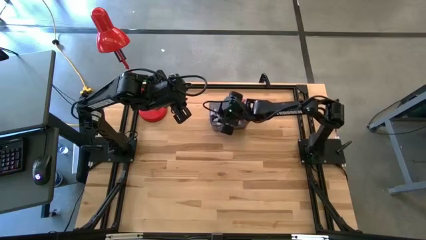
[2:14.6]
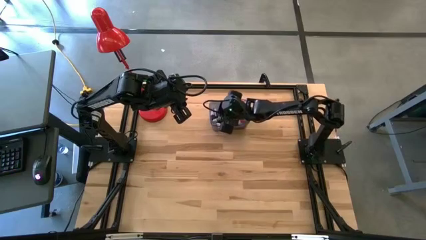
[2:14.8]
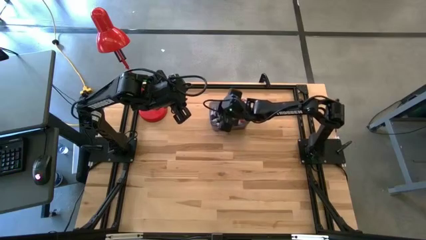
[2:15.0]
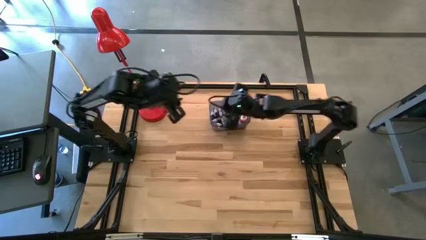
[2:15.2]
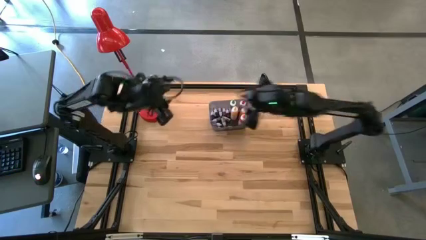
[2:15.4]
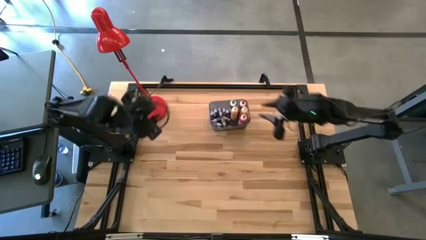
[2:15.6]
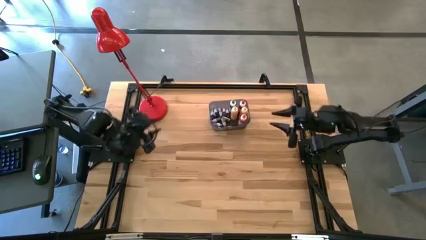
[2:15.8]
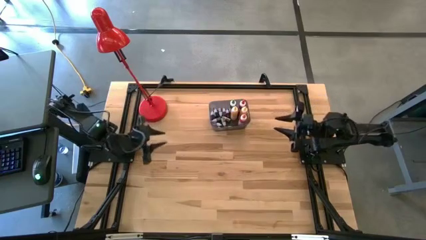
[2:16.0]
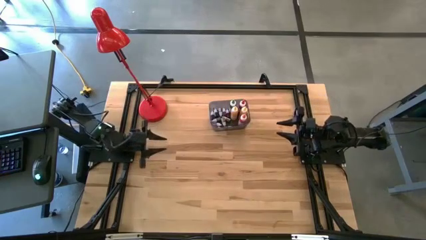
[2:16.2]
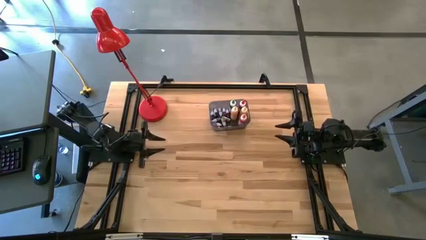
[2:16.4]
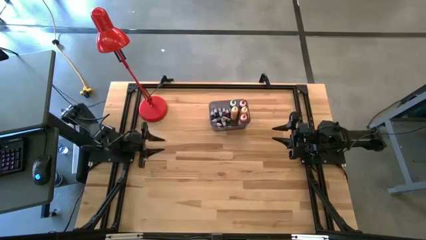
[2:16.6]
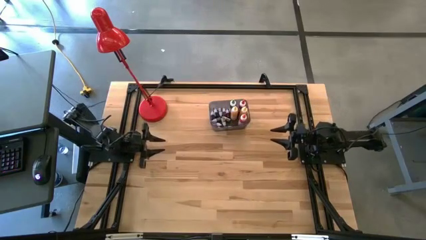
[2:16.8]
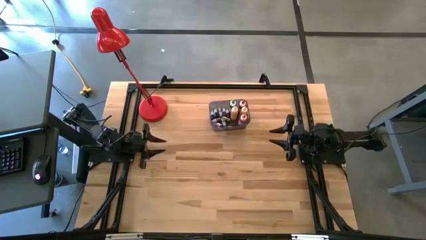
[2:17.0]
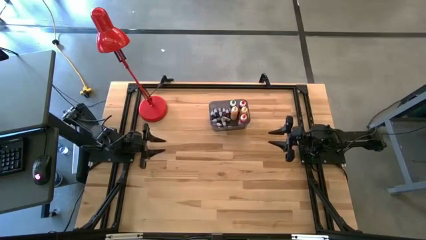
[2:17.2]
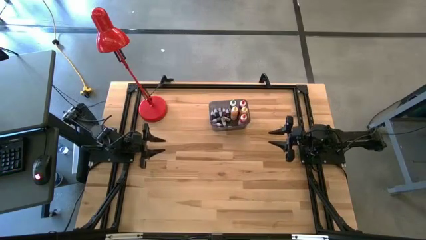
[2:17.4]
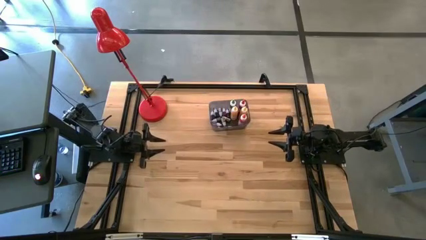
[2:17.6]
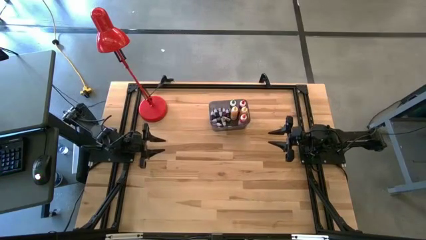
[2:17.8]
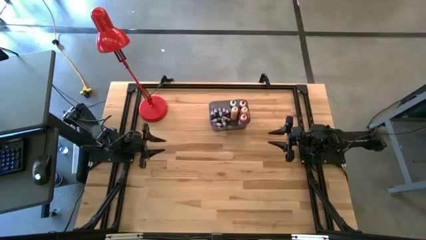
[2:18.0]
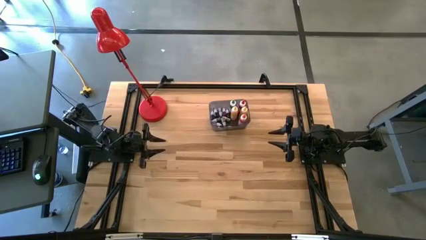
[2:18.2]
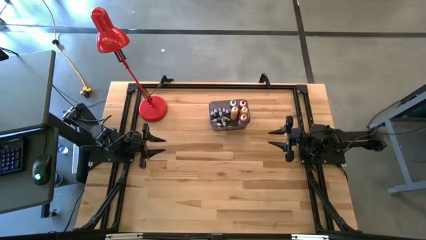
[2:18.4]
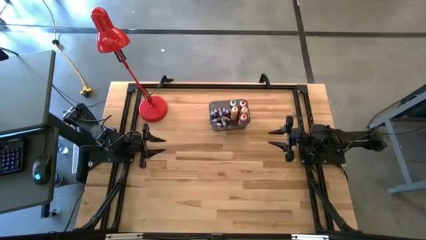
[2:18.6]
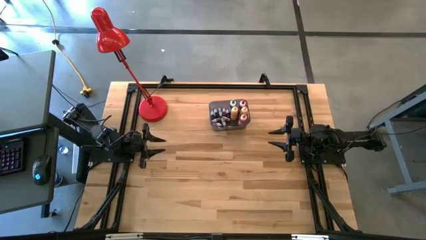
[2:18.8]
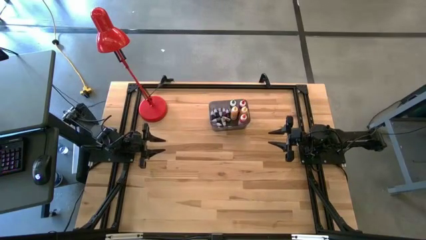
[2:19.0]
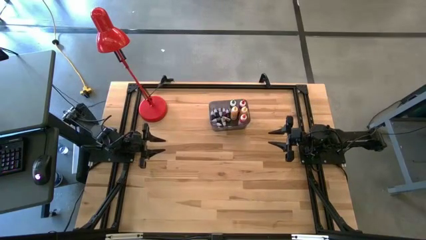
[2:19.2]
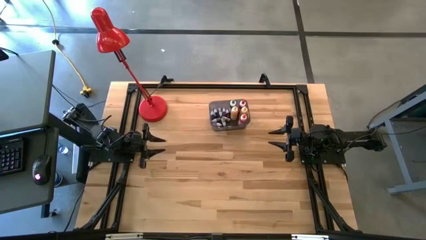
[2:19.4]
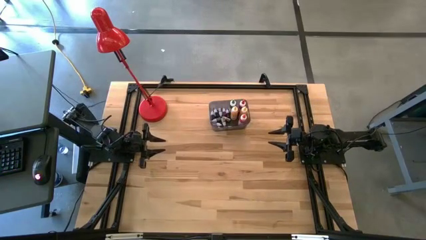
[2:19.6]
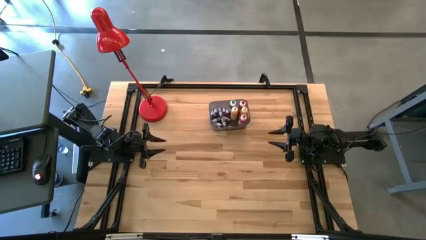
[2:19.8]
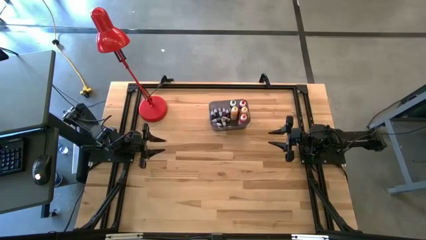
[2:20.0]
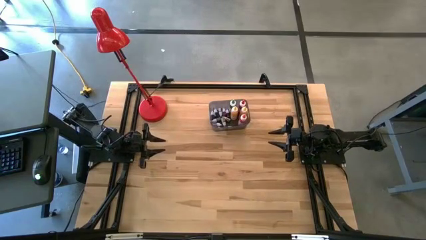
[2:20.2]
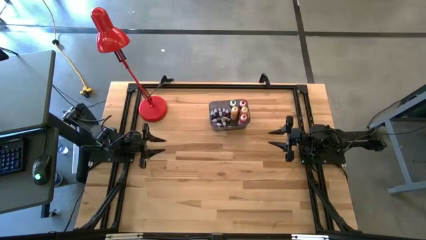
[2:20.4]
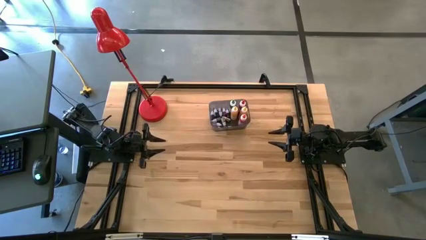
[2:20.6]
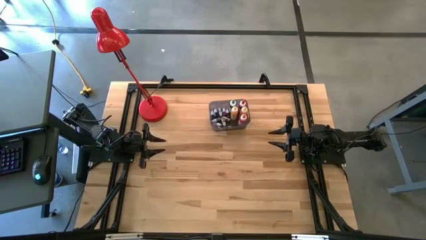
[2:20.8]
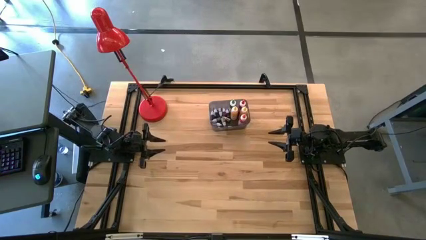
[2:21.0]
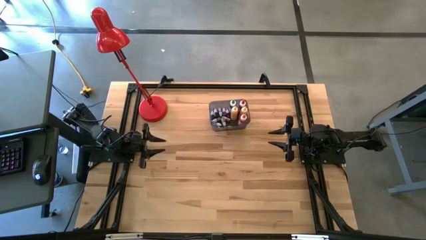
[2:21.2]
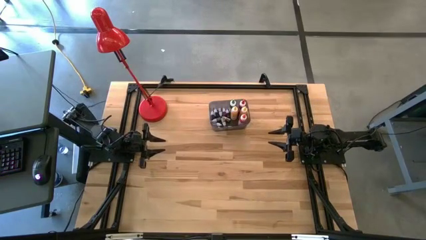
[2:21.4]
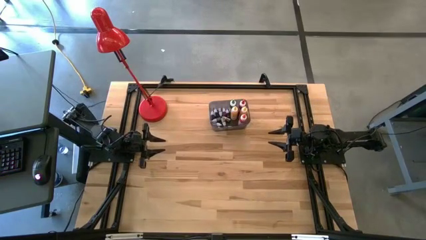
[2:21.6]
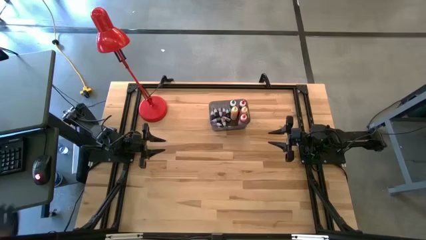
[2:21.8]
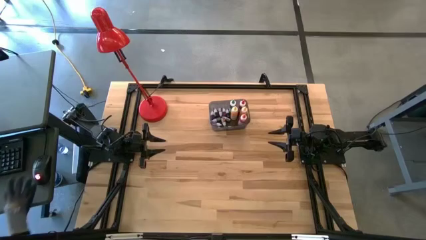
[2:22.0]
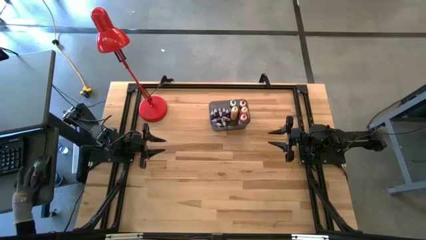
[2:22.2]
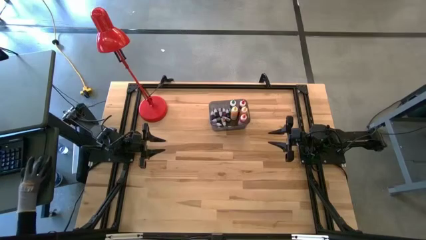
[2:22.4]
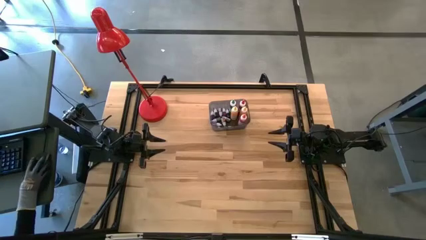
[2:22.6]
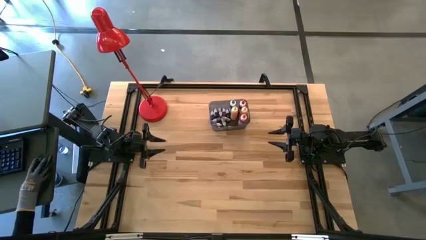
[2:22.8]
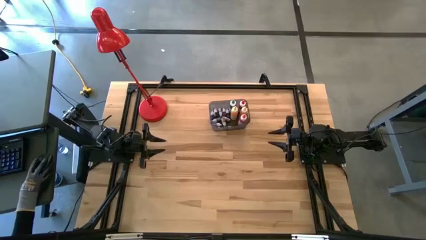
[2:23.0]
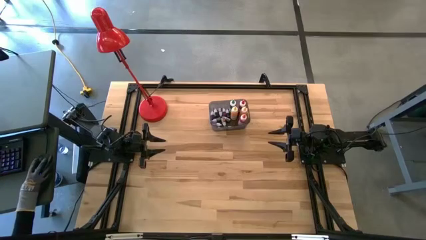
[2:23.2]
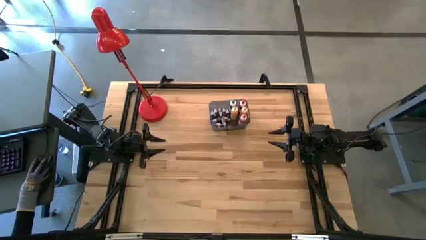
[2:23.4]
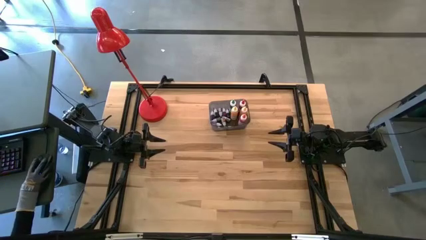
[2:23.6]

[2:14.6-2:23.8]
Task: Pick & Place food coloring
Return to Home Position

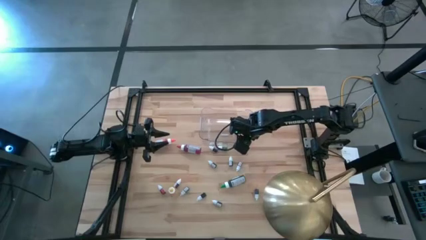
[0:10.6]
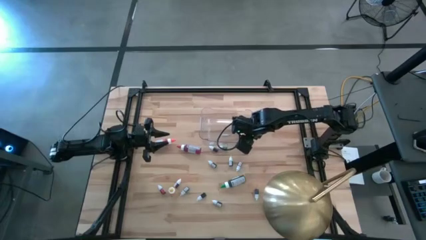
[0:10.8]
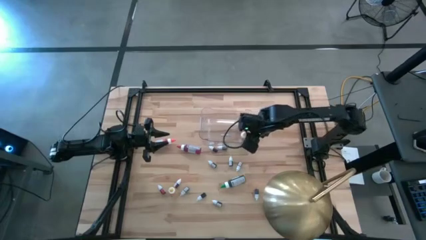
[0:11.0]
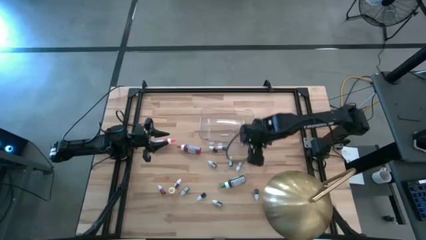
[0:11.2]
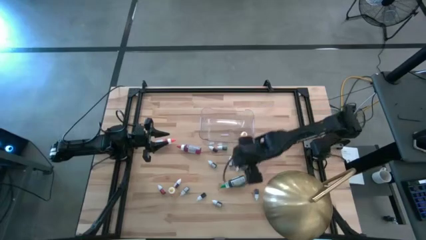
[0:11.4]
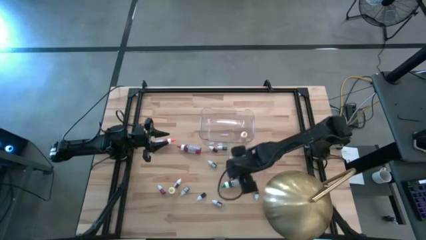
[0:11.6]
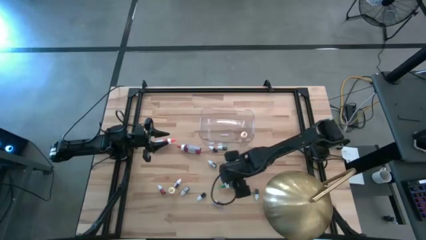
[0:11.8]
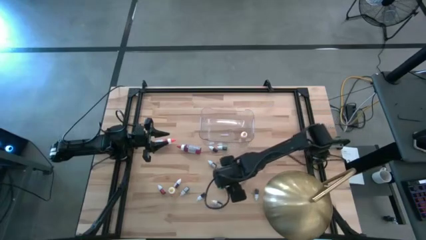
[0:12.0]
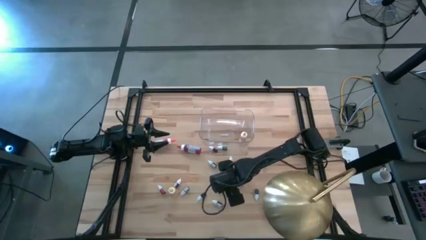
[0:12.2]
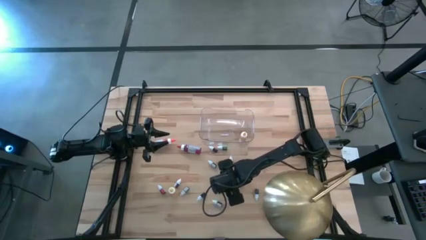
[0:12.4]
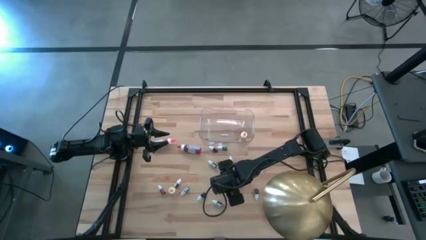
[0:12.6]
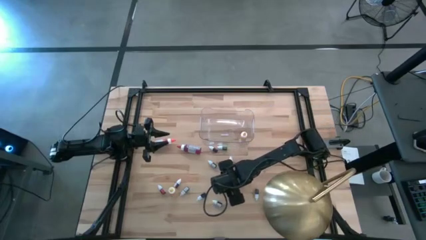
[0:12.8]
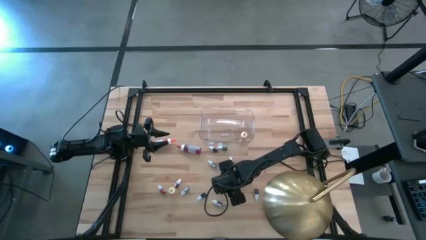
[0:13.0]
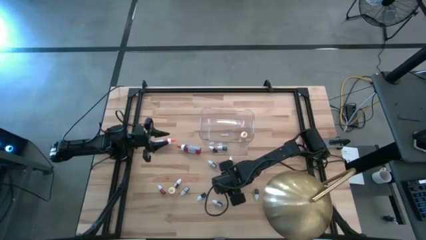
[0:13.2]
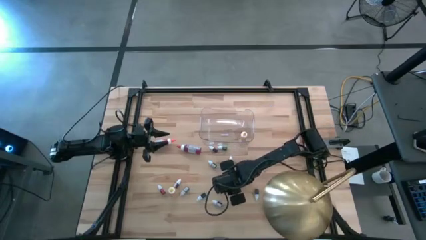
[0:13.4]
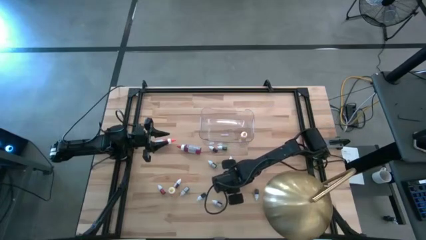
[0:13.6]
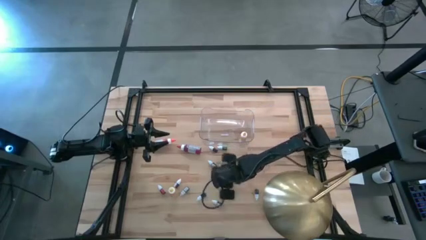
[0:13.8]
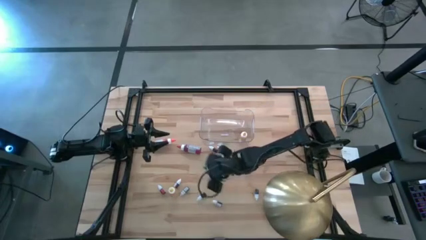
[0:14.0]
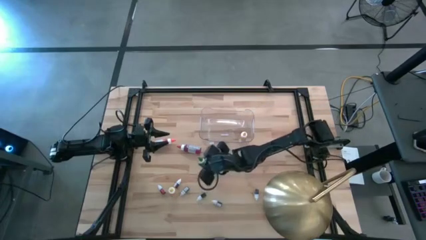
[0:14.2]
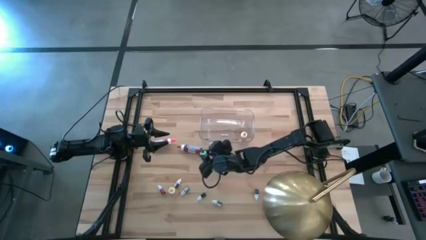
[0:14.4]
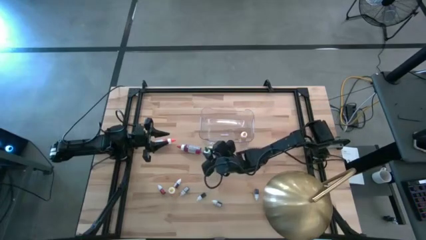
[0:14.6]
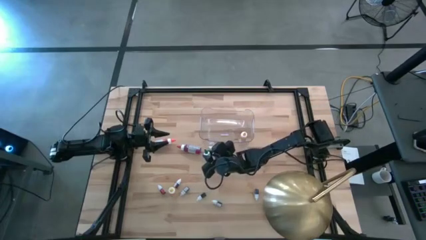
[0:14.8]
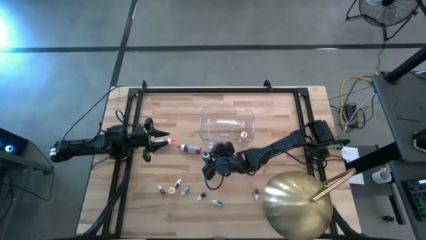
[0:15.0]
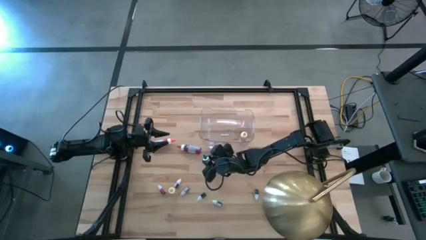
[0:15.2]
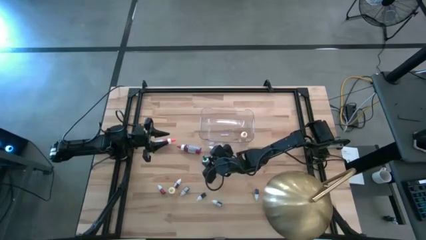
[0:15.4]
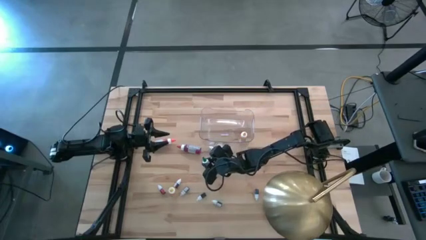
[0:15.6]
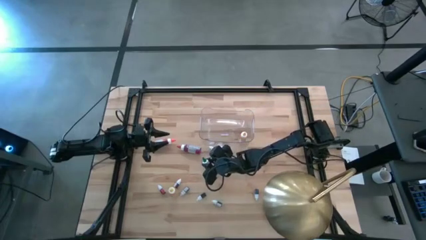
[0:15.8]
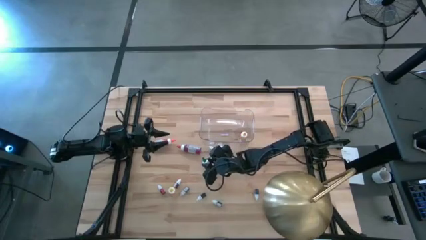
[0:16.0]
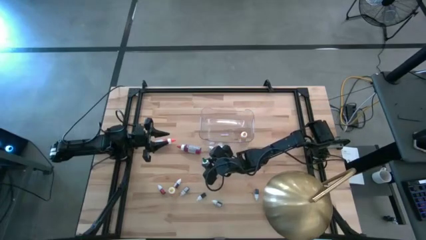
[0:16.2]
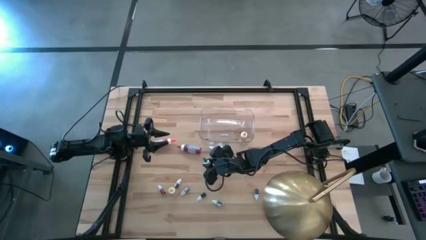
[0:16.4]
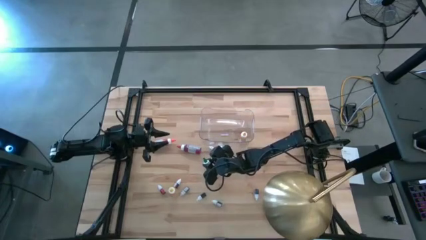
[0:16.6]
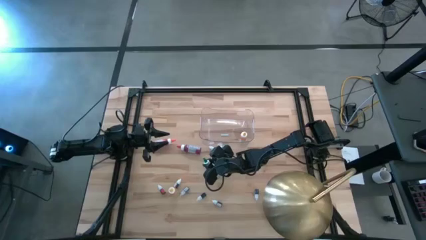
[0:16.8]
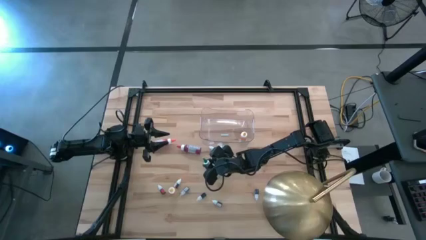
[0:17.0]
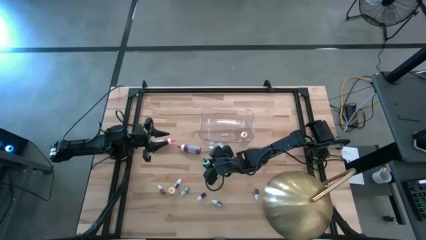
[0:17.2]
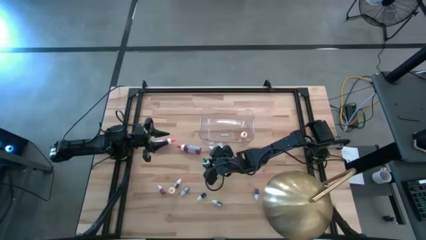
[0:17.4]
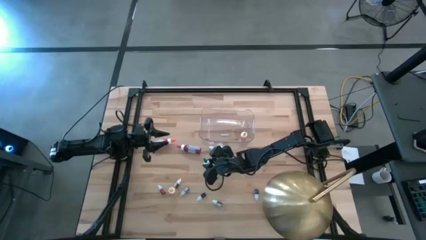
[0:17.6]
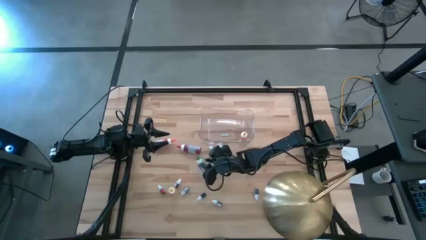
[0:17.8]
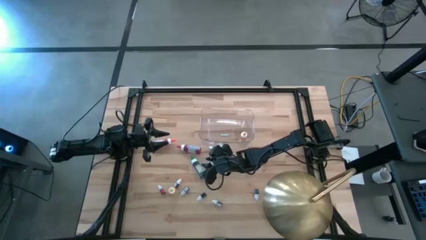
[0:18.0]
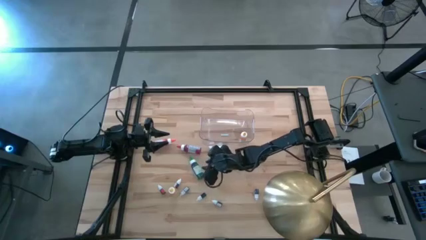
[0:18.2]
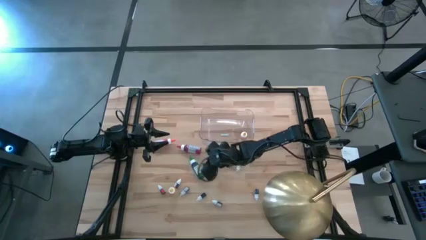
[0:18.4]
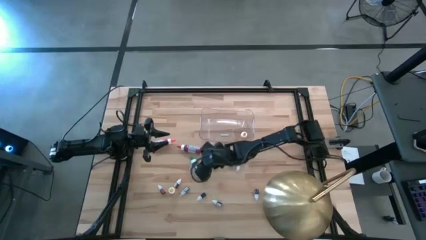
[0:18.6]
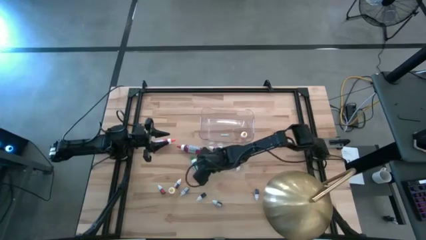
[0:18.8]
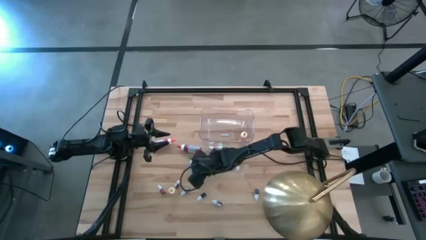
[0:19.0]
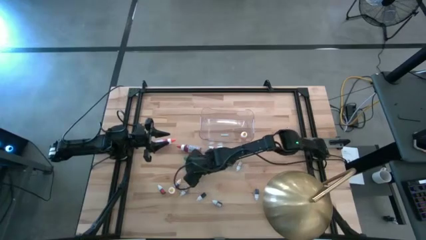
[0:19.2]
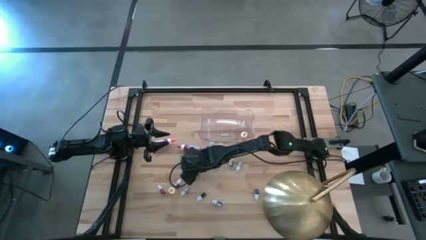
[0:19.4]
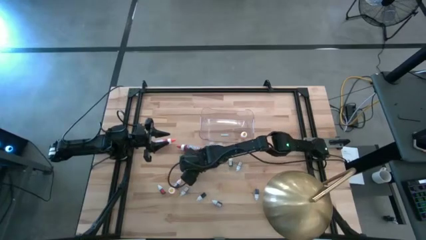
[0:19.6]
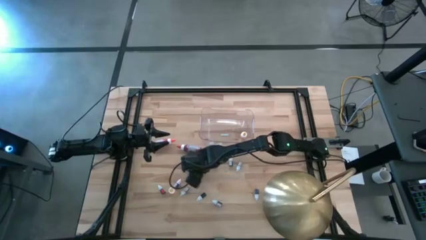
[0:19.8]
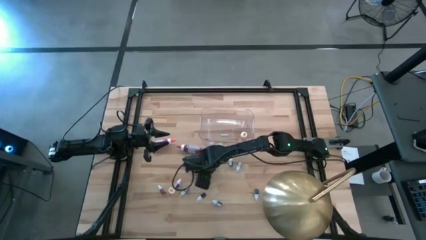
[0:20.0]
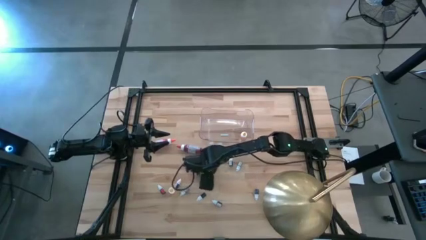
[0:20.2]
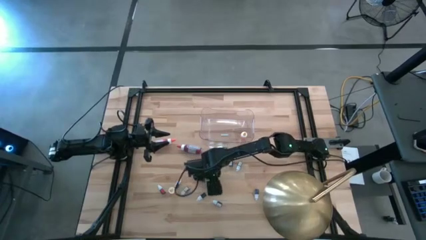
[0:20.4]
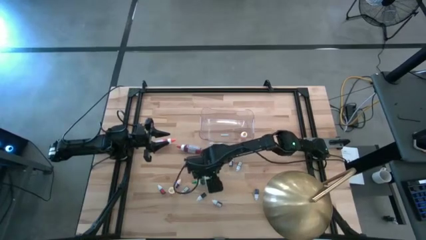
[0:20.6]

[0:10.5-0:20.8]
Task: Pick & Place food coloring
Put the large green food coloring bottle in the transparent bin
